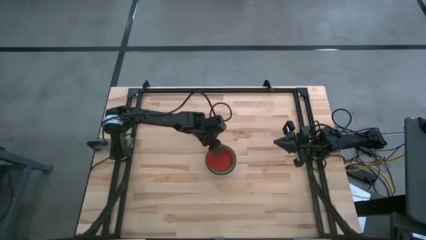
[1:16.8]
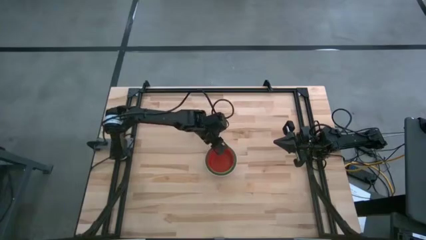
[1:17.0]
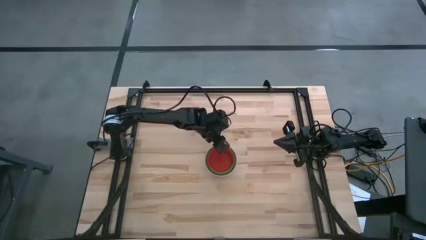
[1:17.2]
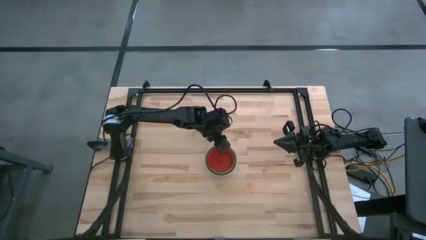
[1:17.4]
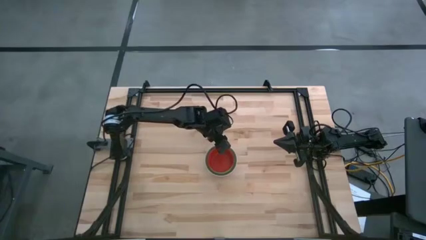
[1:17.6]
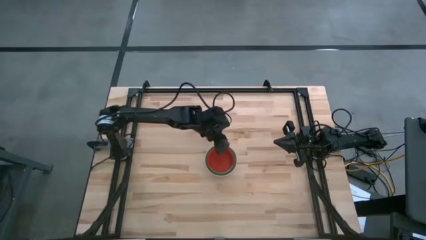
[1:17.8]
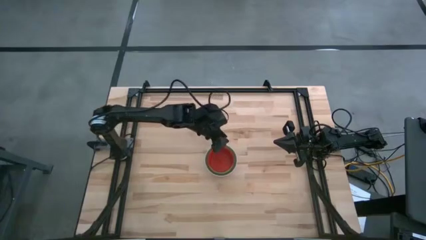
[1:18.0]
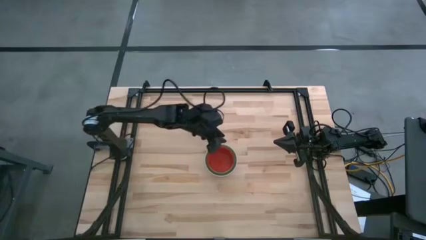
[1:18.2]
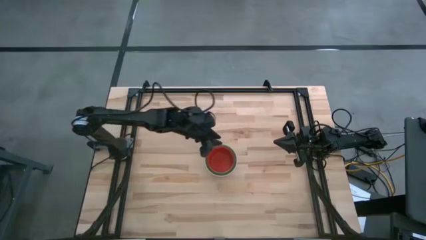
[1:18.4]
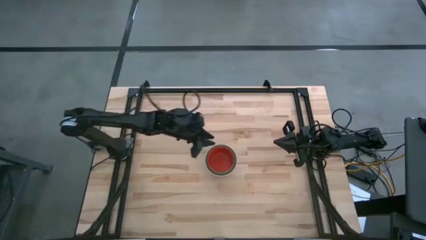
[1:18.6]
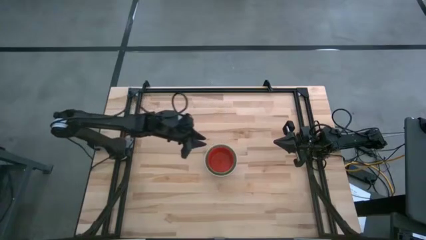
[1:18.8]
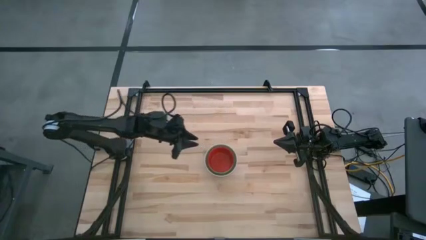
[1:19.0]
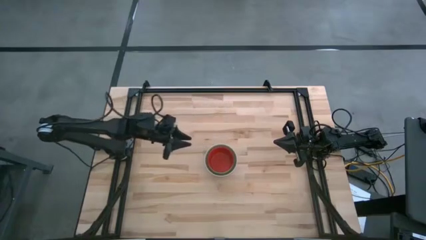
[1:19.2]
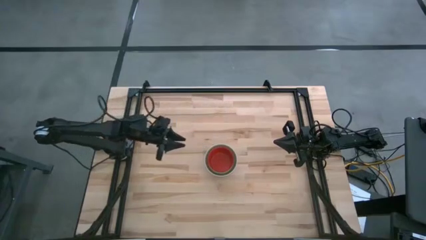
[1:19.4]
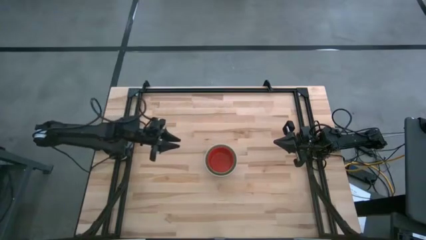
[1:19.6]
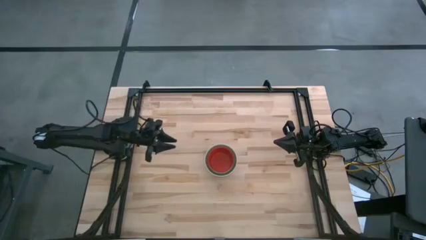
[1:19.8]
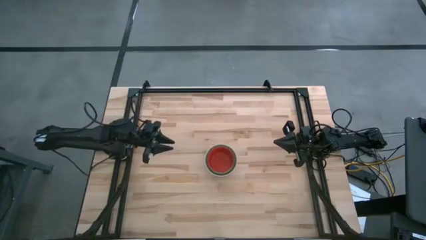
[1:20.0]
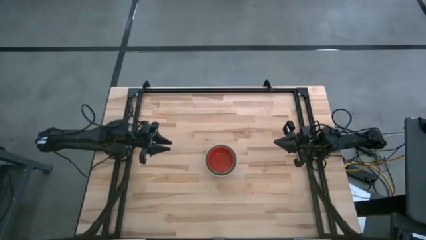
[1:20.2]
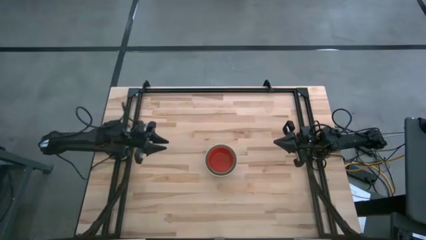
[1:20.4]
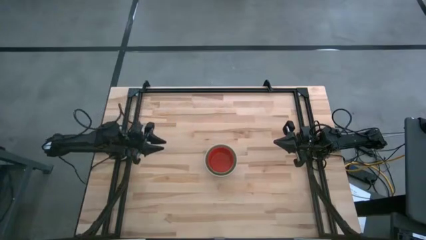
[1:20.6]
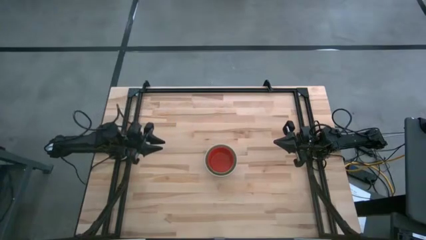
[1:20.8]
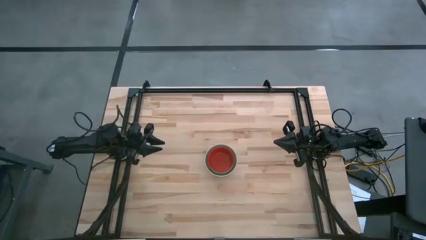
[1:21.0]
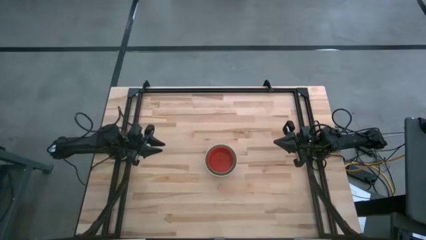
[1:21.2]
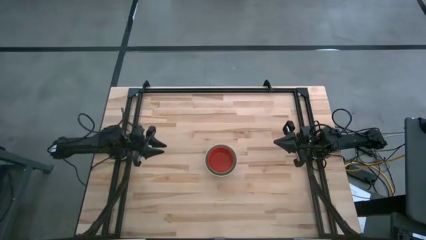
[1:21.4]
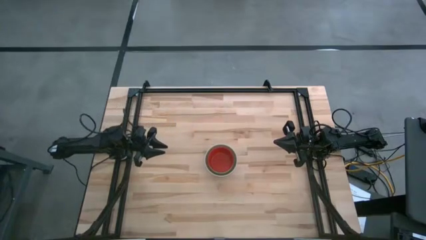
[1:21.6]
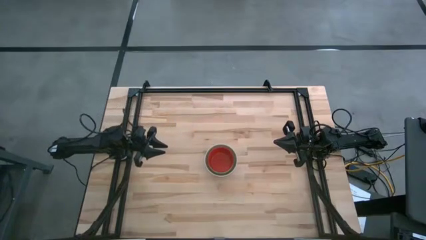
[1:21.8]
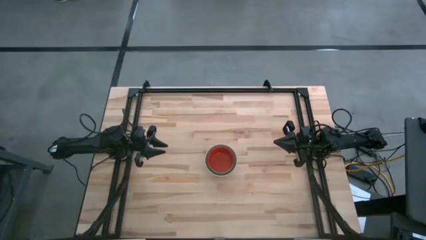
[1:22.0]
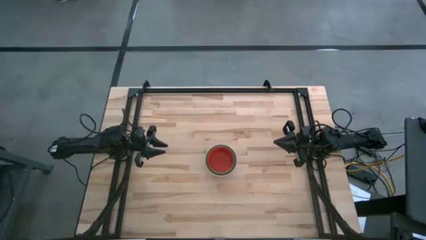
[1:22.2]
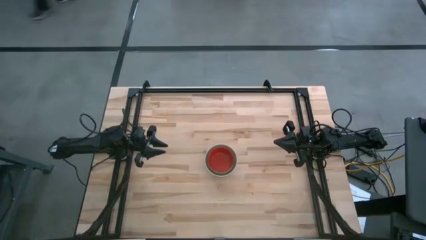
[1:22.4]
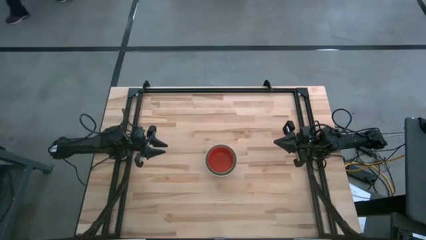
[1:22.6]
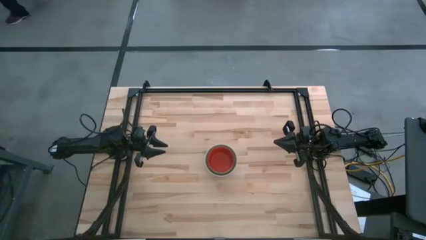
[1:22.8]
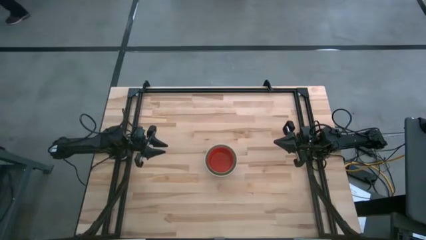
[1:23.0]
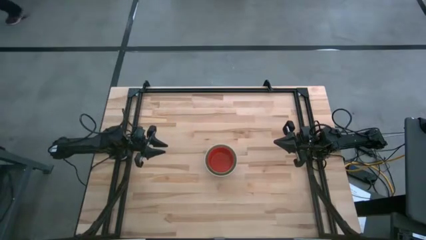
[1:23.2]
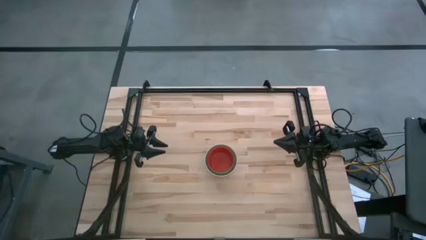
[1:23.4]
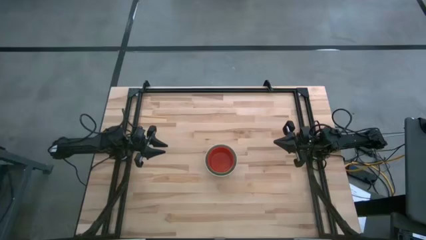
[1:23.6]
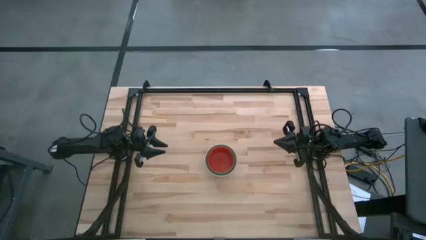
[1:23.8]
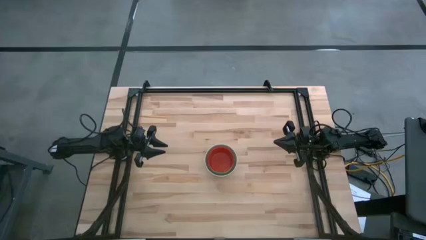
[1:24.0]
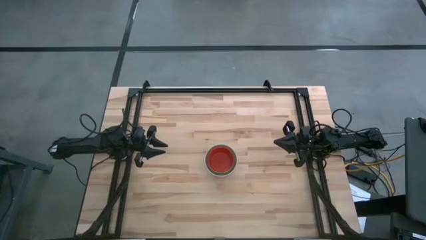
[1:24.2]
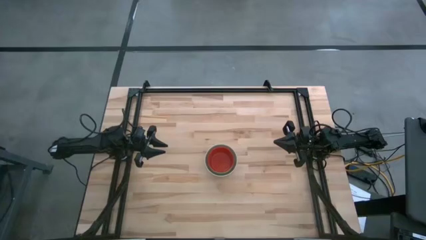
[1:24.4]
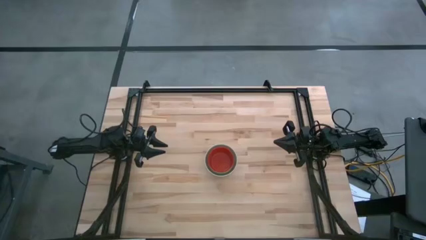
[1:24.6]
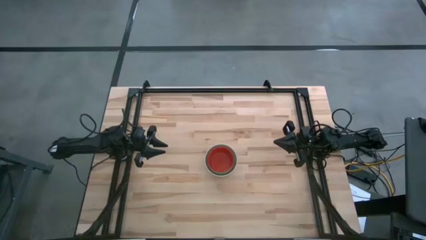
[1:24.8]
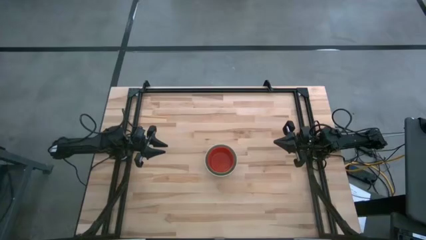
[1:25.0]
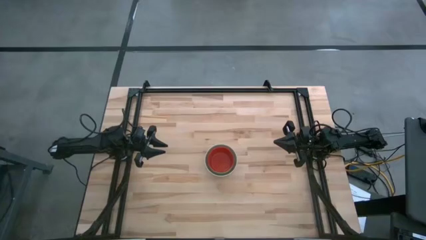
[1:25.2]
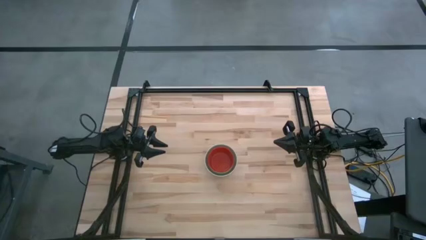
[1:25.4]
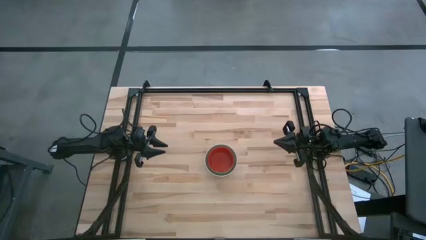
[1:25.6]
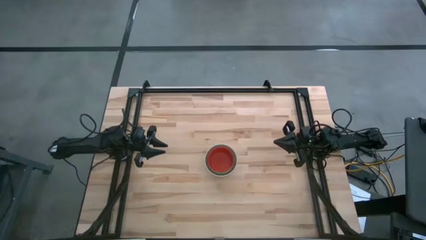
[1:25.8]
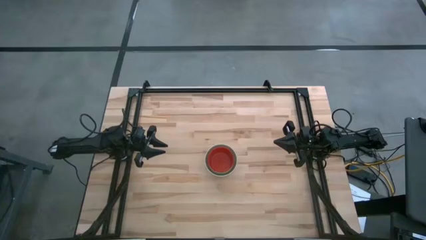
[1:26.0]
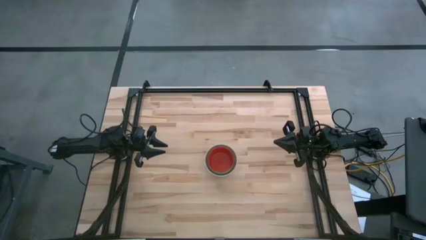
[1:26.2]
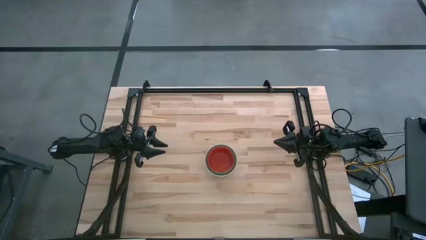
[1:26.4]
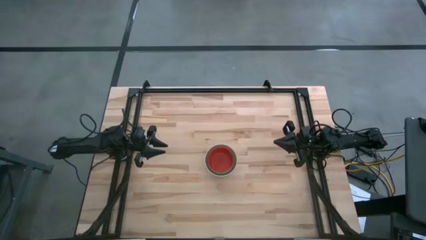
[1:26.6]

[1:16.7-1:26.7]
Return to Home Position
